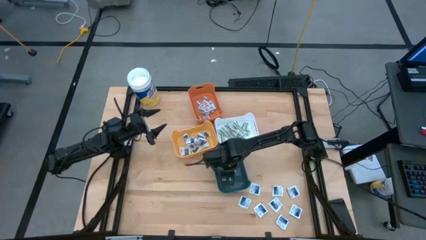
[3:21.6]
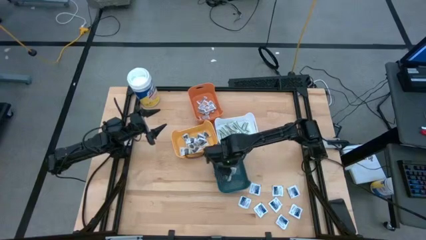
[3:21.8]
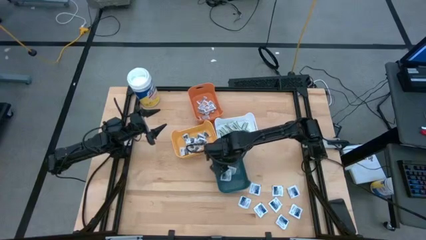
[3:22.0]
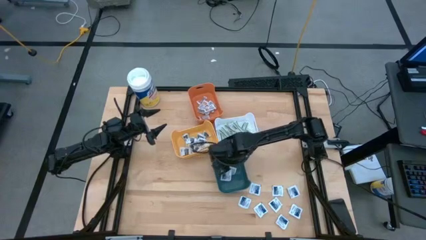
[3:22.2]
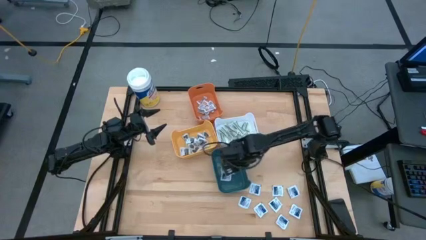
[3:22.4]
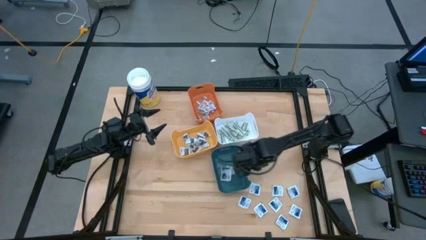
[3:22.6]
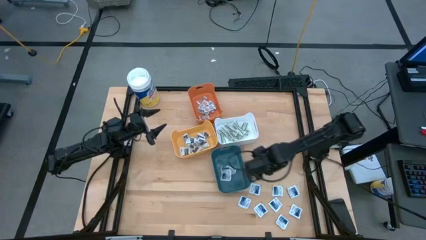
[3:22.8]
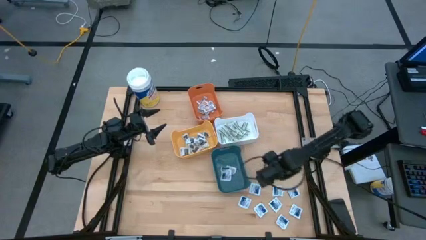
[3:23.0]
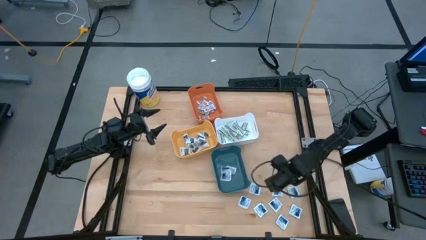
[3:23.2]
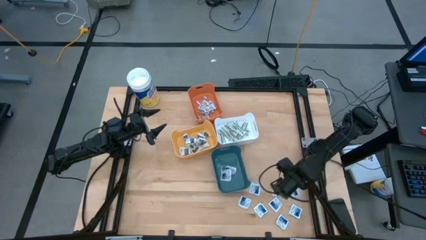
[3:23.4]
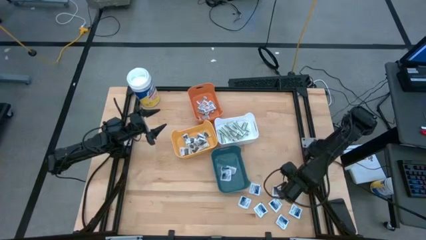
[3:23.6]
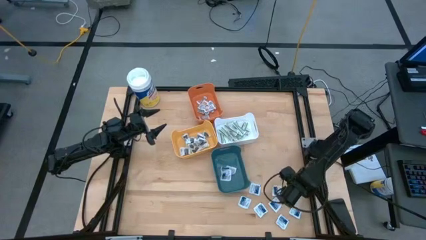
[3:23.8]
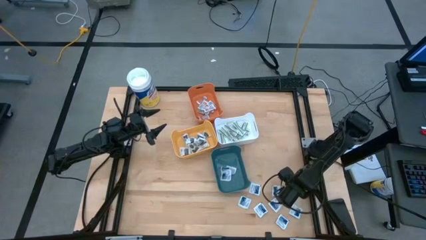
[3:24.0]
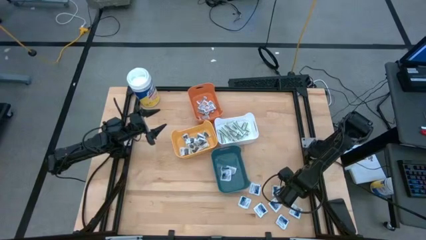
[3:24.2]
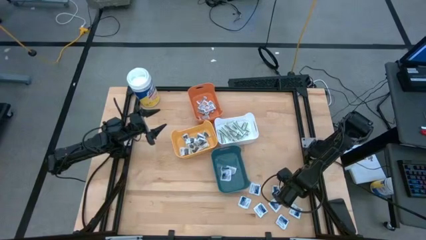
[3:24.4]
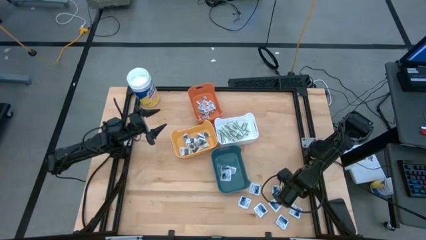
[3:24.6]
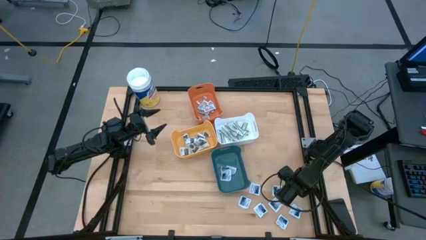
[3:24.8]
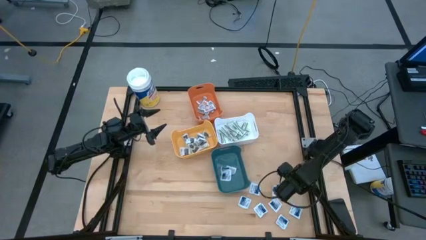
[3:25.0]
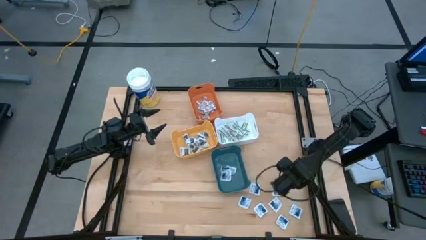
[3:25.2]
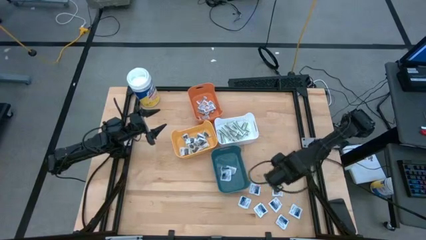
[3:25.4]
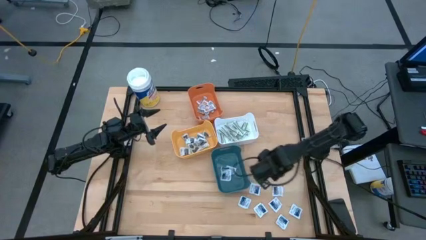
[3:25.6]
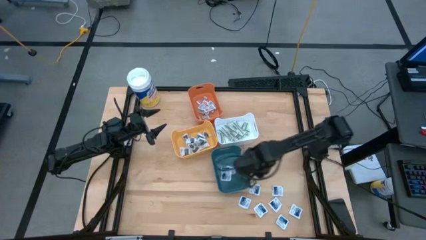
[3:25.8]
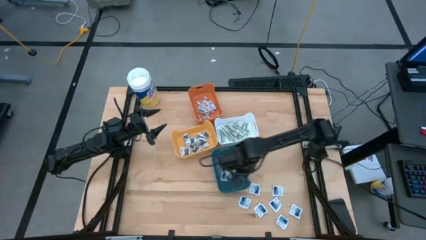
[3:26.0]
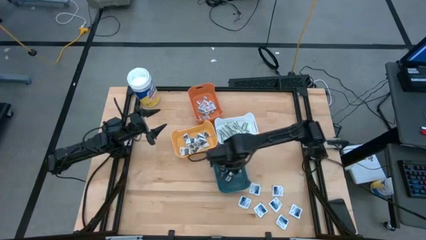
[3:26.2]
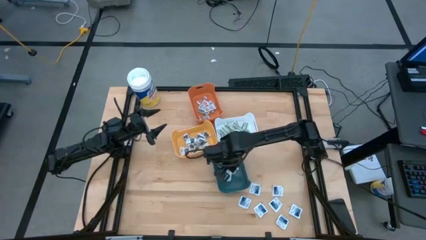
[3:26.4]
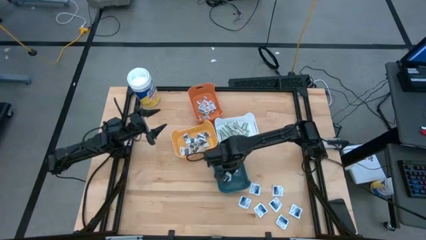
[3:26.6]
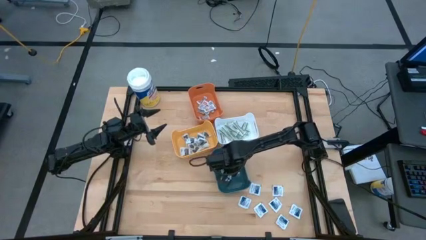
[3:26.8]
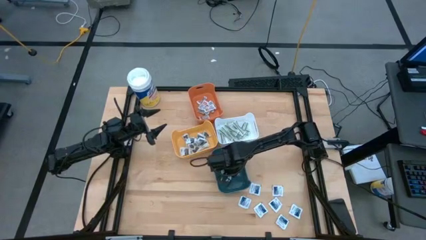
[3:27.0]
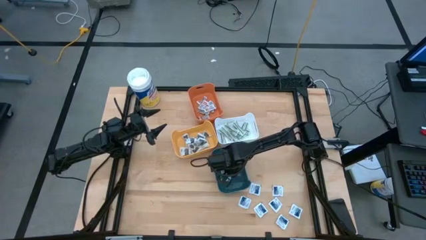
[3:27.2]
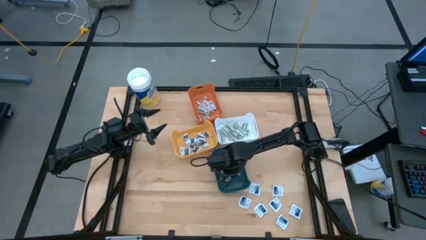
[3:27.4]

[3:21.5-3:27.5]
Task: Pick & Place First Aid Supplies
Put the blue alcohol pad into the blue bin

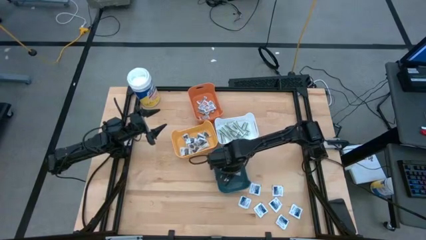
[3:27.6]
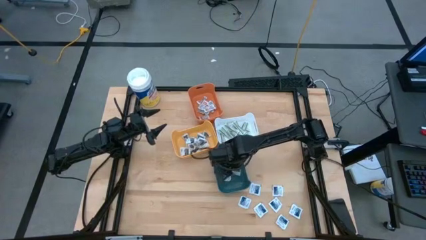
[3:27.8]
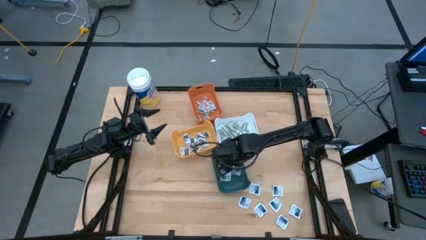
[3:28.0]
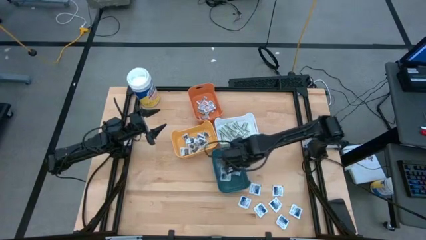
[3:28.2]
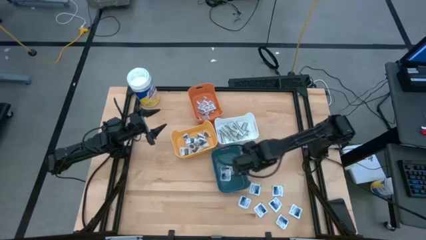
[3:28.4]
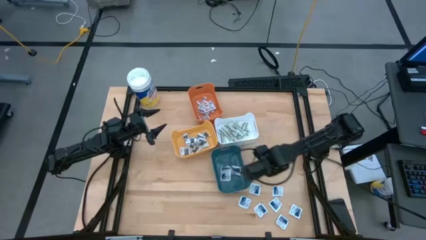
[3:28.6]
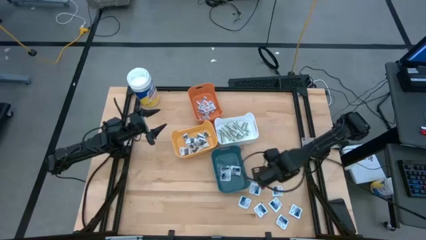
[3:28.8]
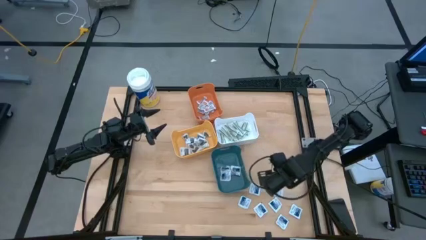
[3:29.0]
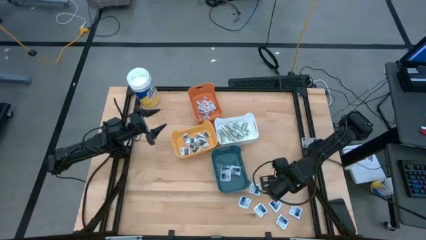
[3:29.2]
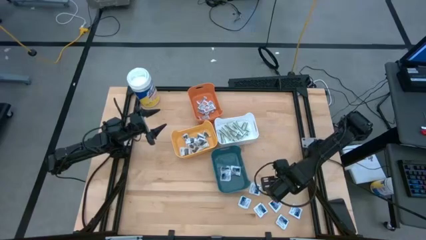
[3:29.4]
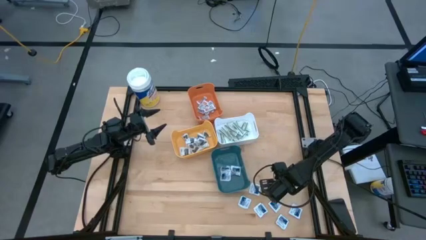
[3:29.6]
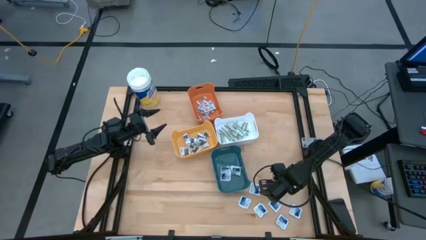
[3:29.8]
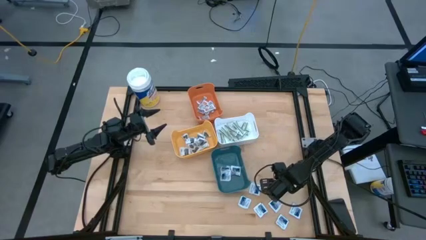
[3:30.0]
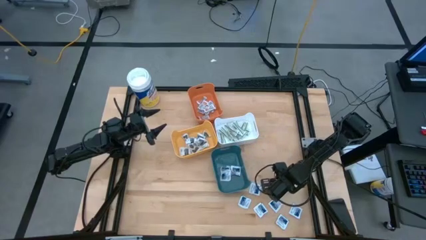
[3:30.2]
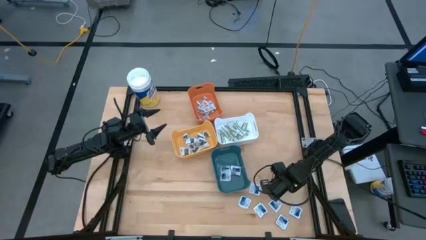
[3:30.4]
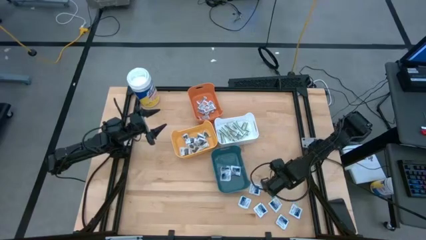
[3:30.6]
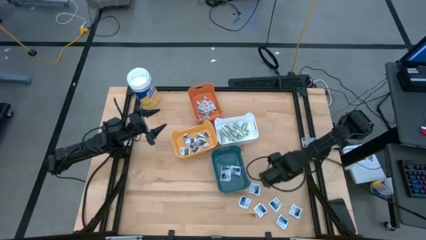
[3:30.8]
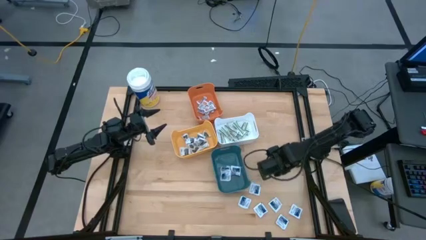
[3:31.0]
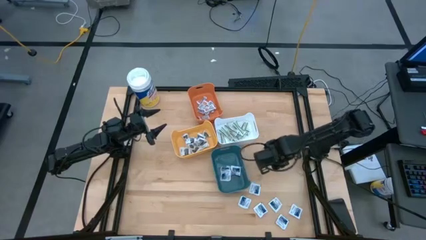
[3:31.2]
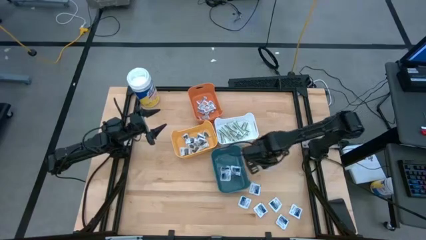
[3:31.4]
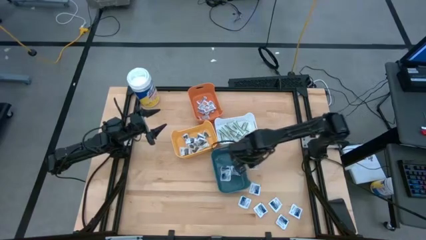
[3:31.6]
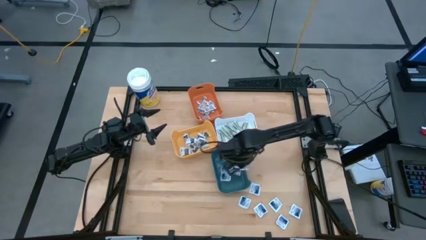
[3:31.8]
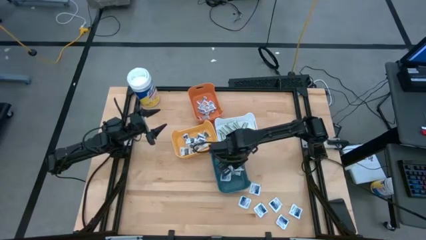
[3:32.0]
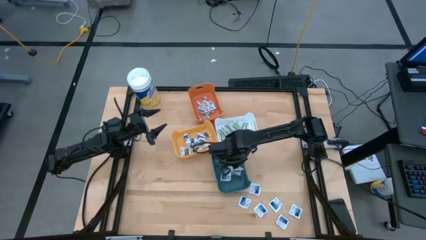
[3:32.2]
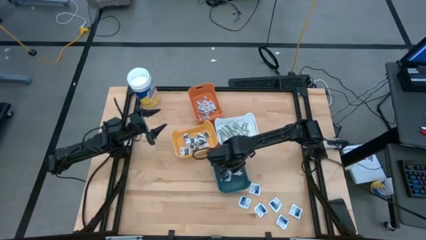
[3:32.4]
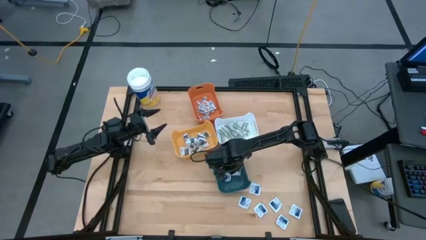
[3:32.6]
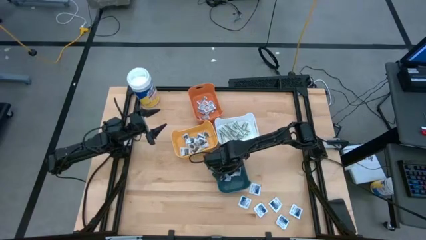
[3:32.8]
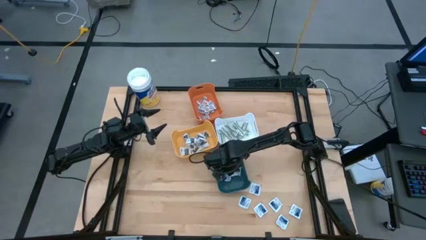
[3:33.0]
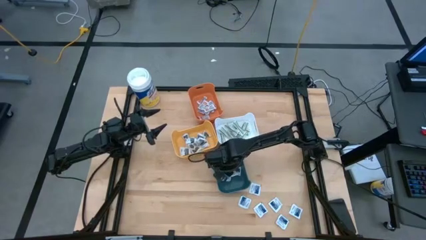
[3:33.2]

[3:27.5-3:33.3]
Put the blue alcohol pad into the blue bin

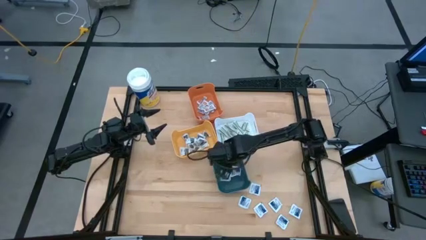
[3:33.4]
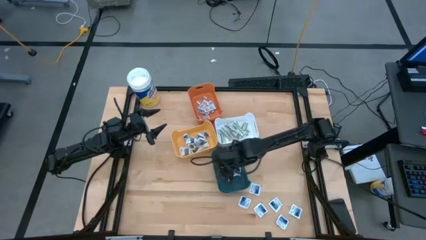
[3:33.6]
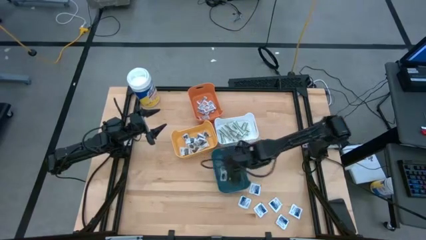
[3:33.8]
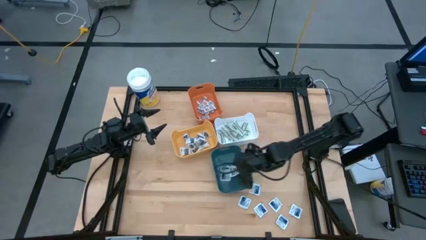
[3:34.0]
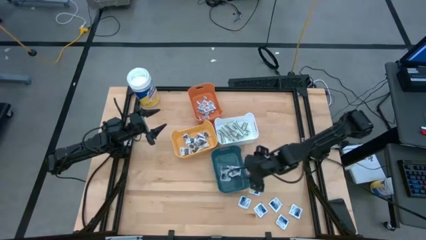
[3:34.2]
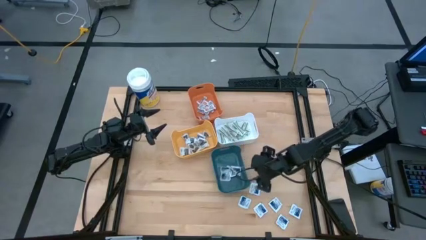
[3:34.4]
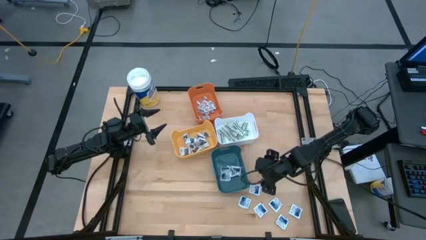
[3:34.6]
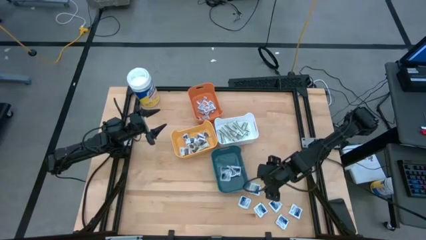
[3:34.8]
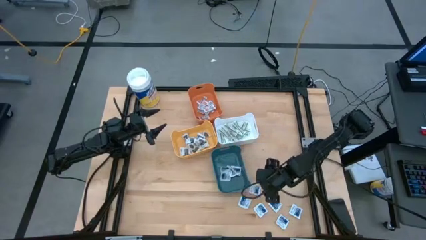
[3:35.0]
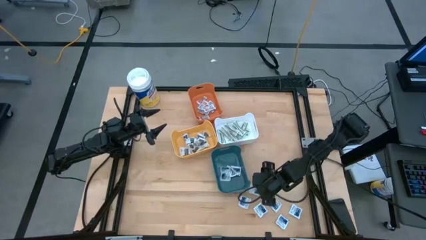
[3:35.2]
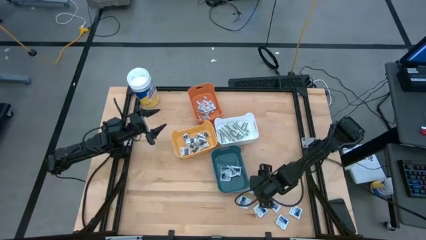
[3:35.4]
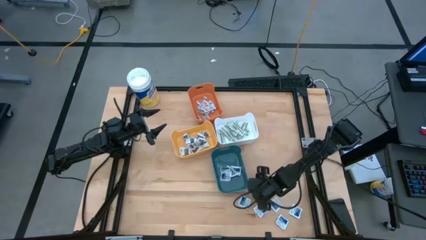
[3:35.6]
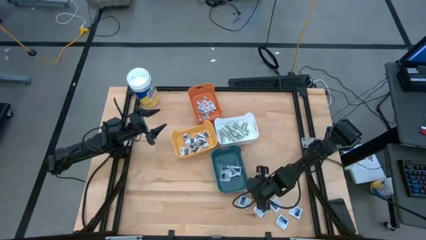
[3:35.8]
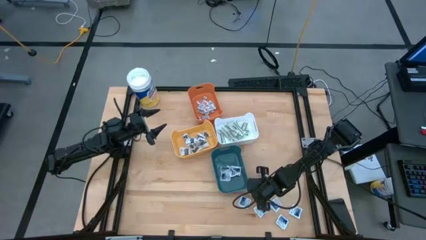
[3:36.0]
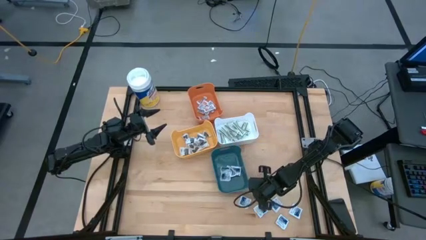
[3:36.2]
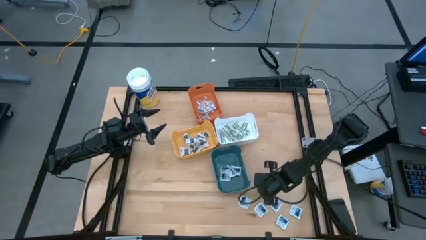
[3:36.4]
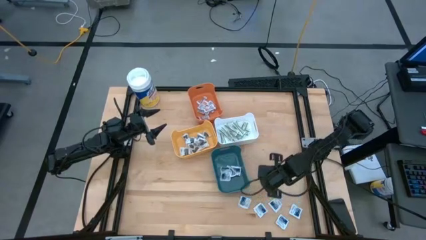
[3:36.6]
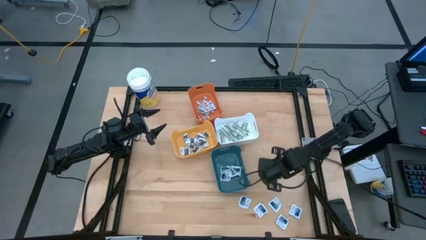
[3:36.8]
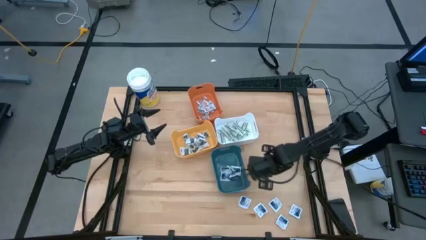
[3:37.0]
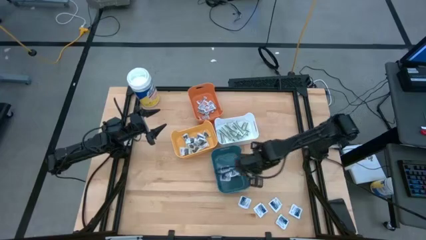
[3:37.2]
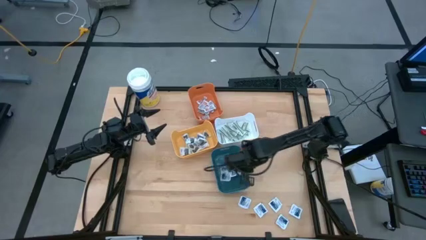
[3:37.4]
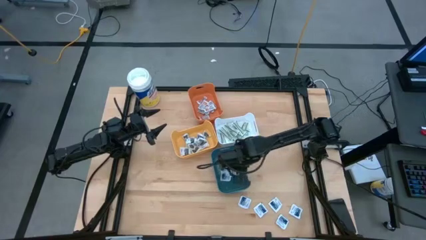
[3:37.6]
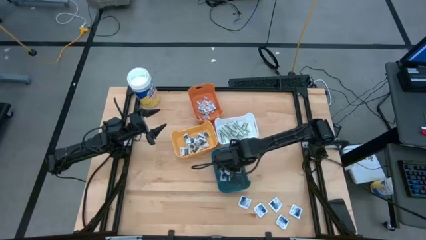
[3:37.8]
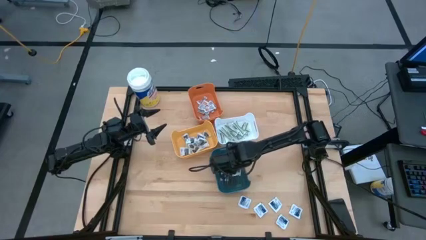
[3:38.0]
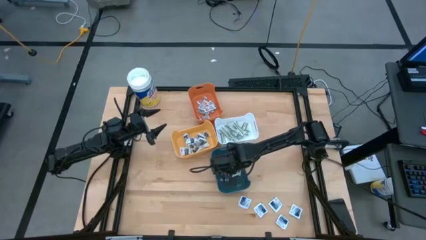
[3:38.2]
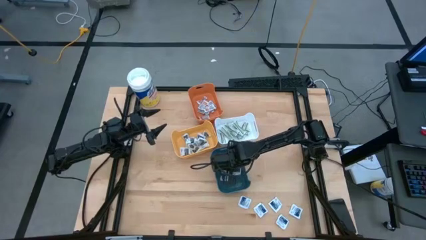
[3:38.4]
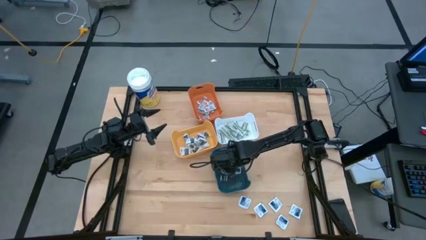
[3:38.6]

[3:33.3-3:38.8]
Put the blue alcohol pad into the blue bin
